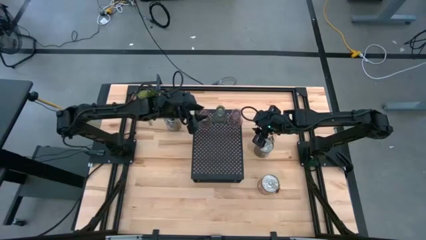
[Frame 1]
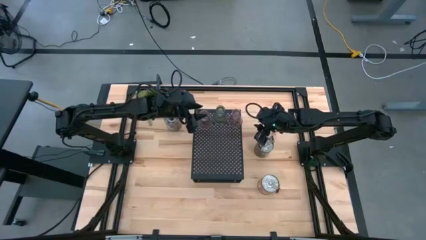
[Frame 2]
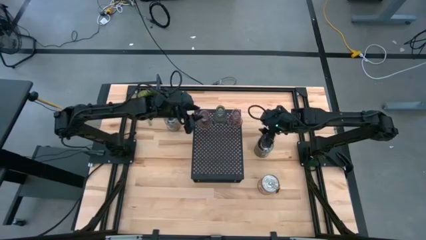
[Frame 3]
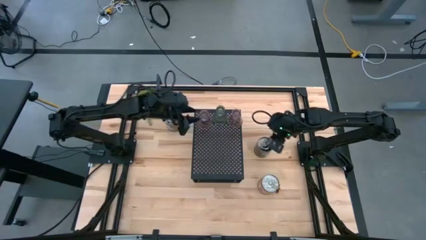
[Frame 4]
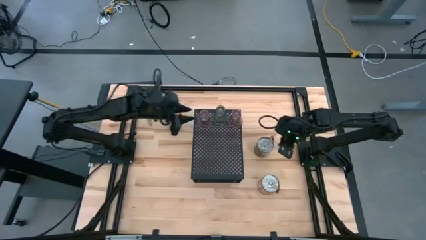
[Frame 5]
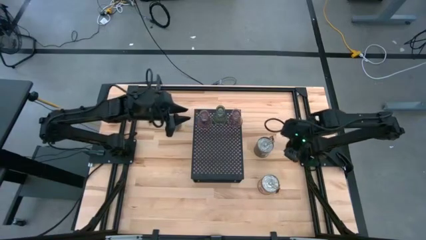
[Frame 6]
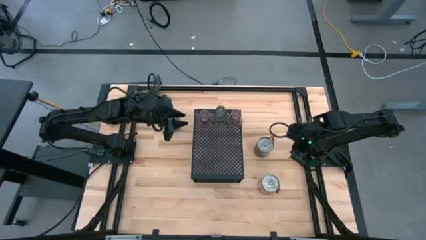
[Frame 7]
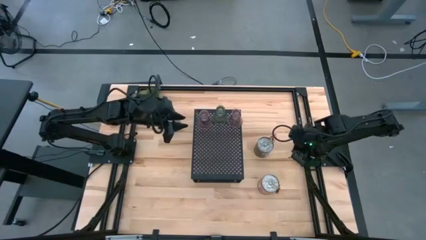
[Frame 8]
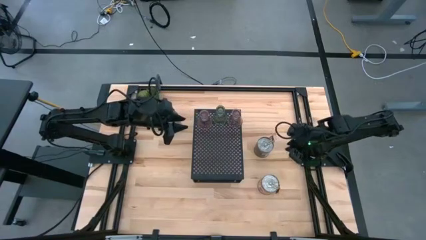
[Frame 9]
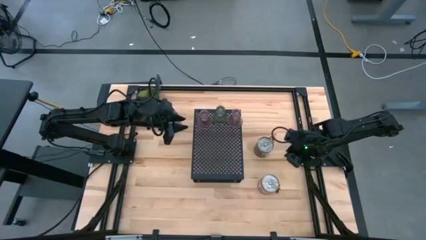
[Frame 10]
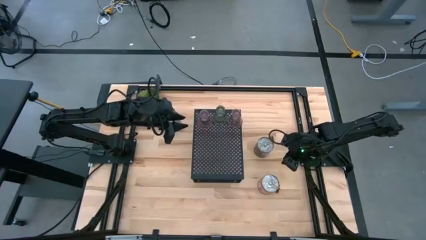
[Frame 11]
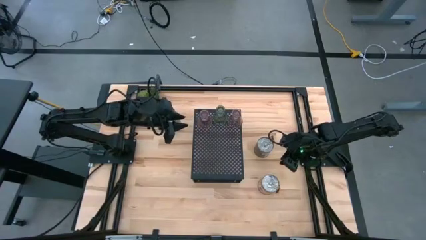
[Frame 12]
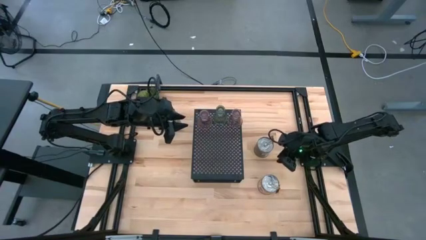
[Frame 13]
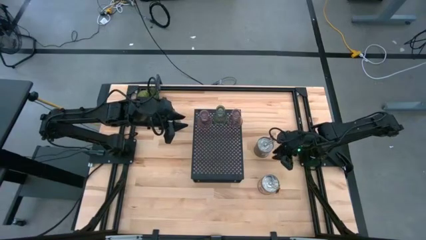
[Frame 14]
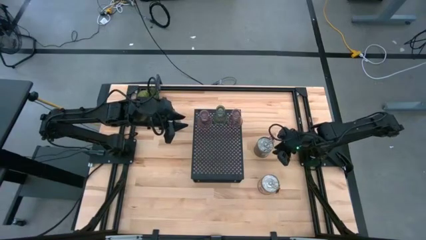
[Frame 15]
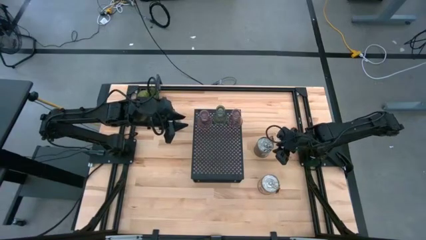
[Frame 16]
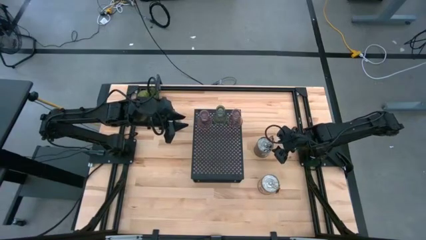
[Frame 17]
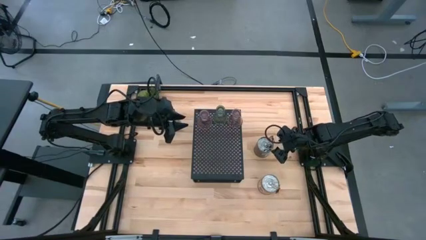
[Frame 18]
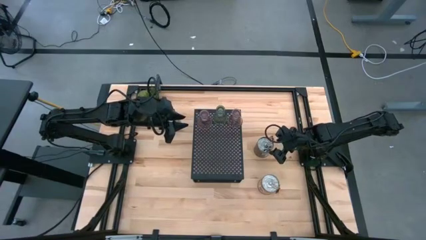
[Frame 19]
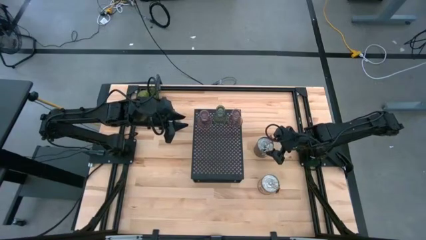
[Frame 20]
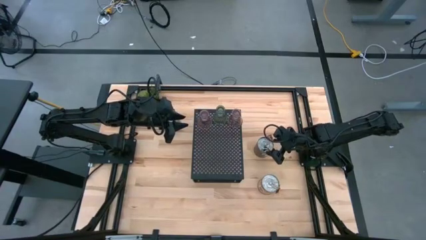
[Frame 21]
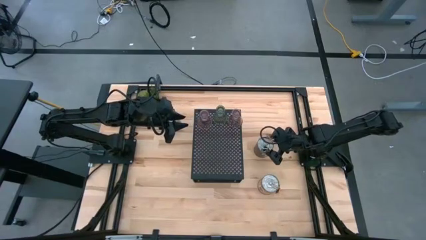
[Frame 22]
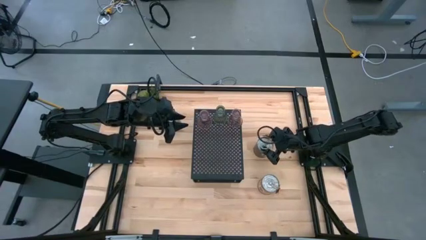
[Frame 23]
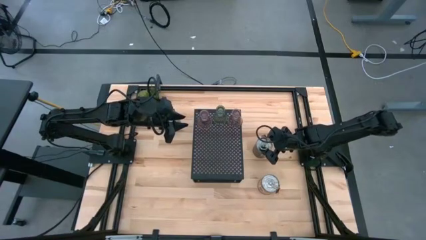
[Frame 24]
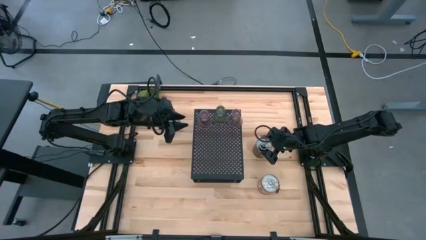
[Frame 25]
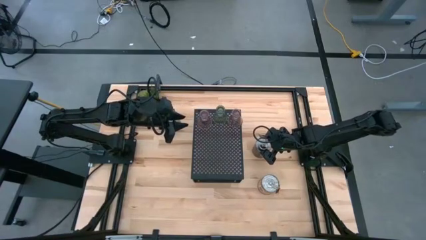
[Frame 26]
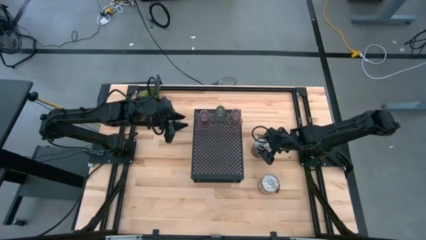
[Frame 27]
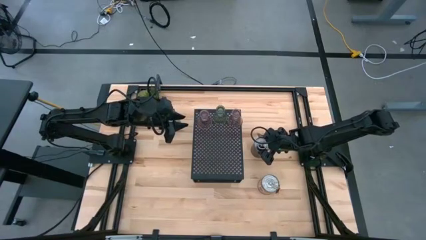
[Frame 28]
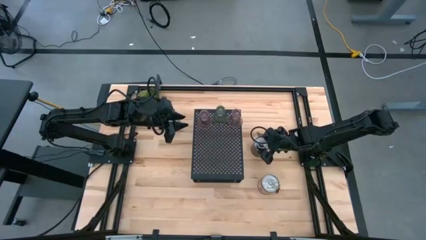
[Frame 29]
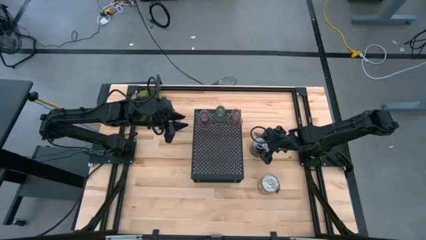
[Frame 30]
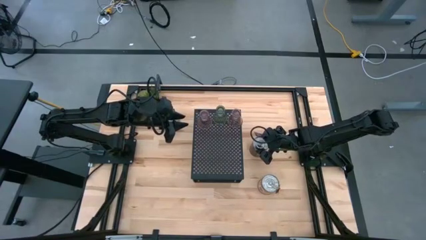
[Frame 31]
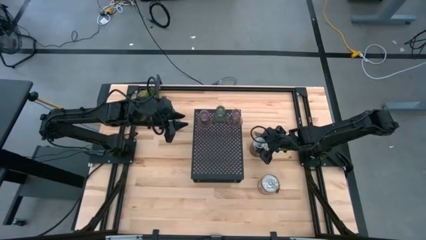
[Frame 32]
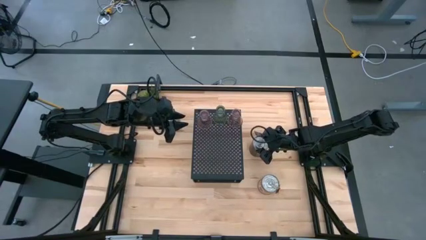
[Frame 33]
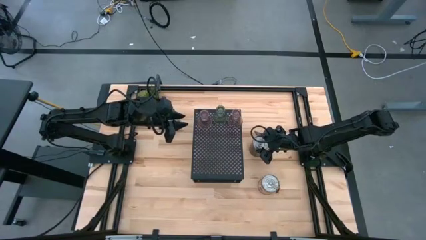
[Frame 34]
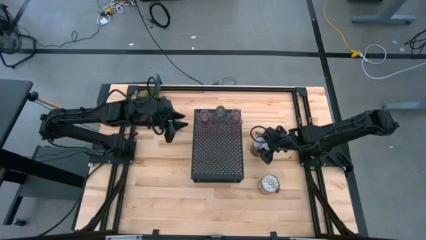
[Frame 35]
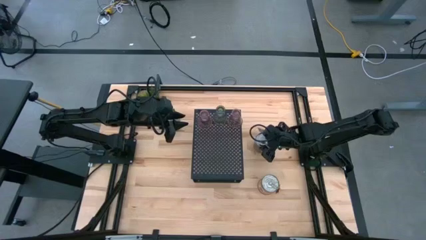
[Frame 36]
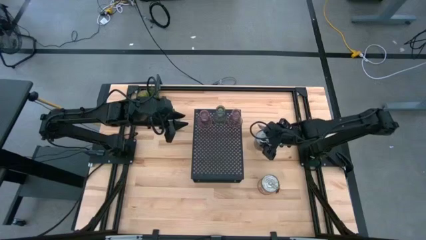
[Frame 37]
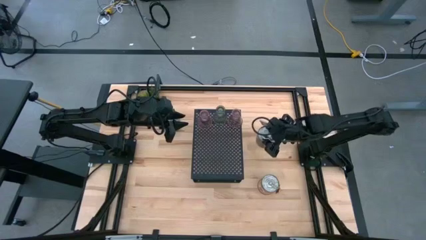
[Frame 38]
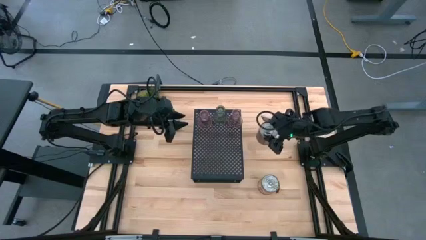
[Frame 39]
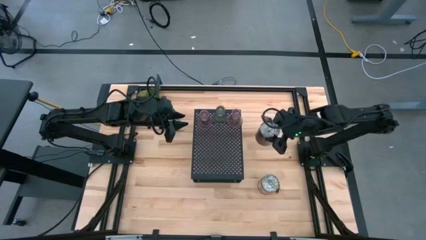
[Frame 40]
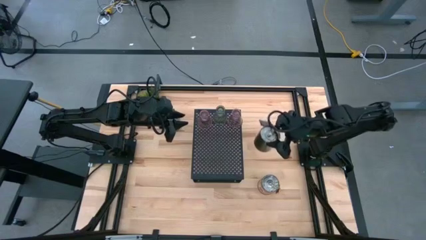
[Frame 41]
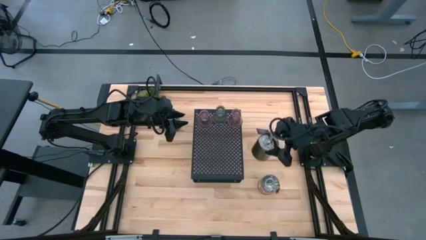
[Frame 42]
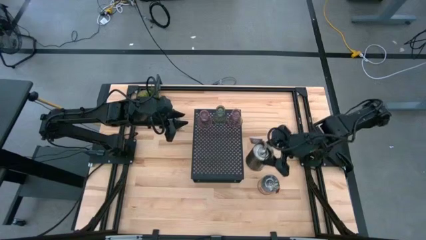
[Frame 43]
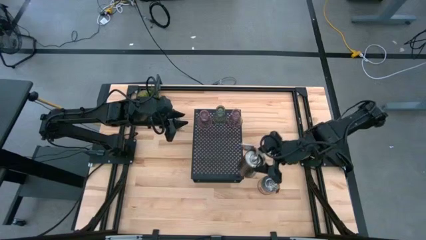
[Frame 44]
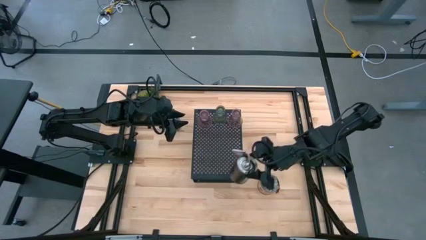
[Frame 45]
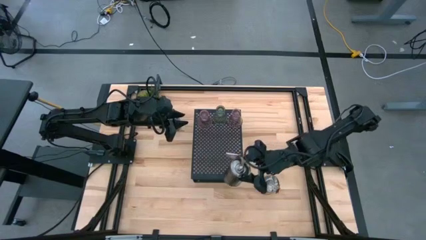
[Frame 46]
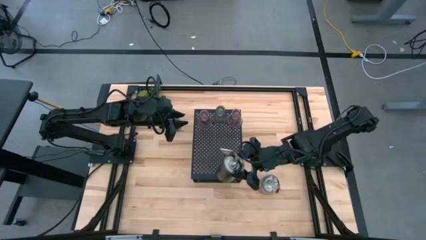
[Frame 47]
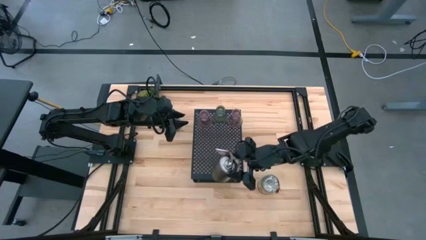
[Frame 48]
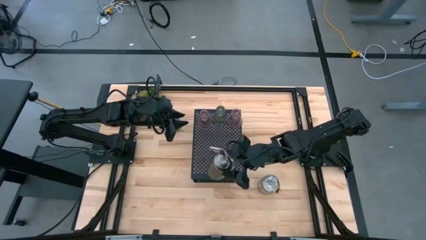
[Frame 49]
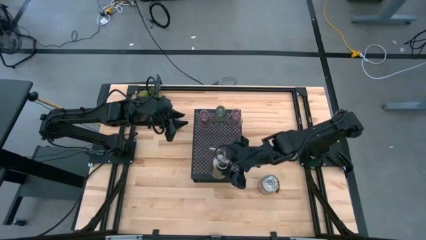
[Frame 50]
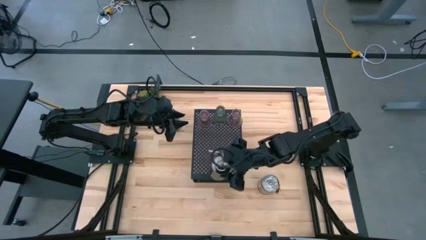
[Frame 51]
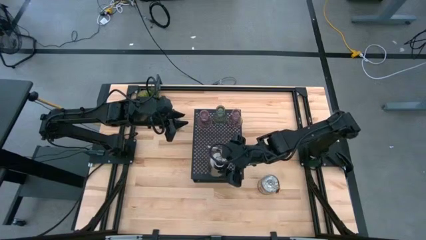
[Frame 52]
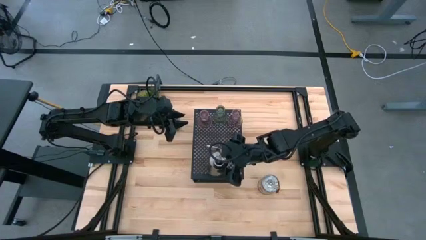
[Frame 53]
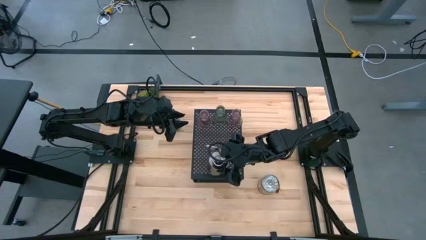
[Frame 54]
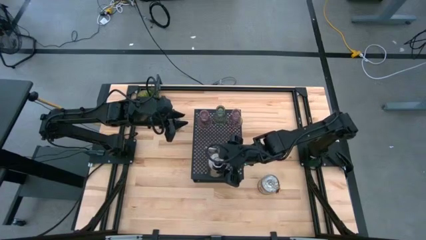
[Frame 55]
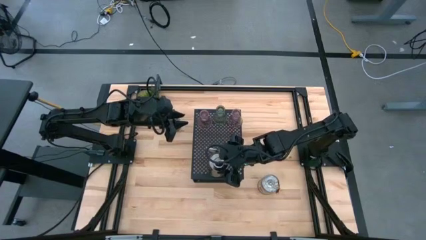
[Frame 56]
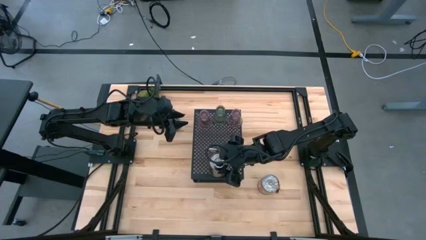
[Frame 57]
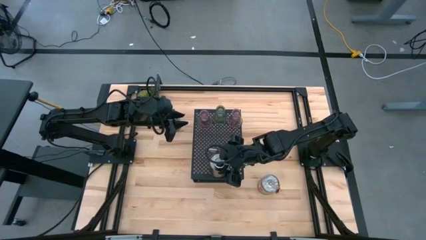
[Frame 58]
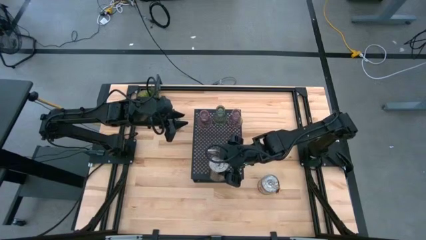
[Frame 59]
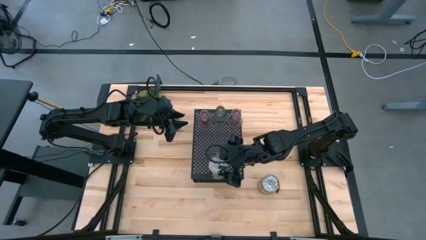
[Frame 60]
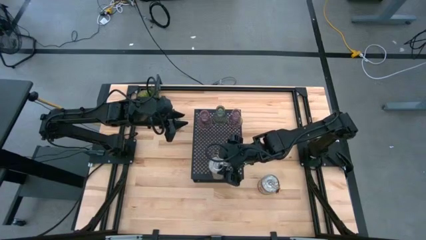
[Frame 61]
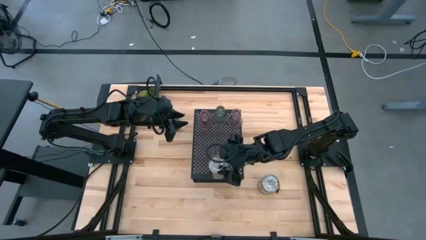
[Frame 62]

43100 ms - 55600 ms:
Task: Pick & Place candle stick holders
Put the right brown scented candle on the shelf

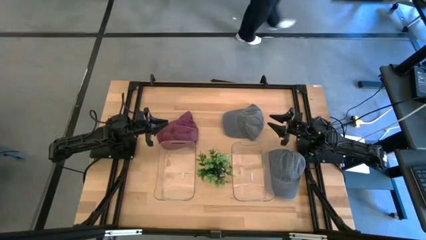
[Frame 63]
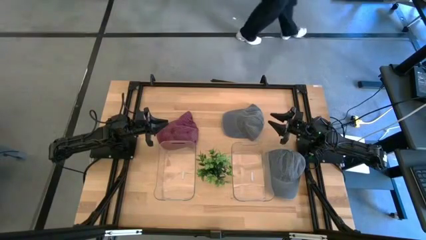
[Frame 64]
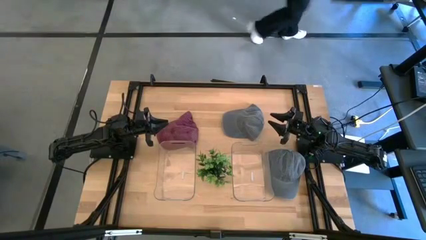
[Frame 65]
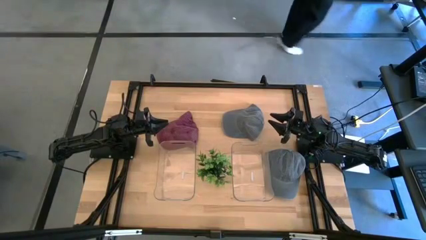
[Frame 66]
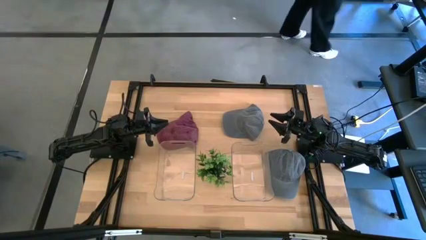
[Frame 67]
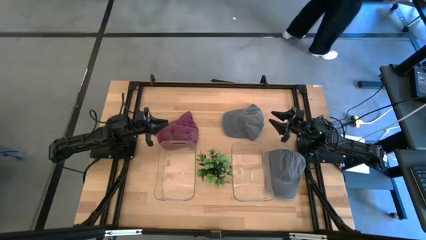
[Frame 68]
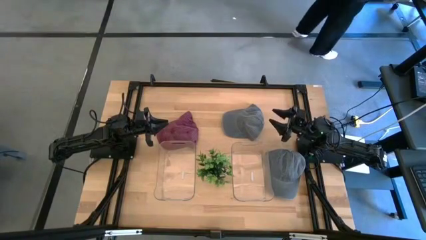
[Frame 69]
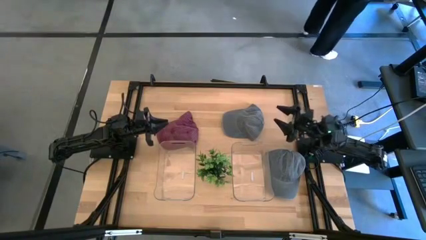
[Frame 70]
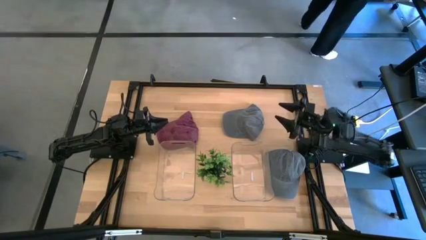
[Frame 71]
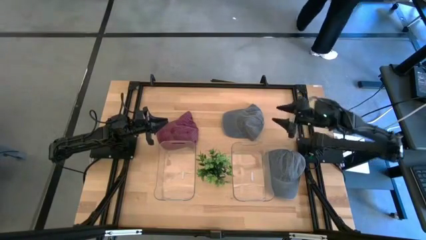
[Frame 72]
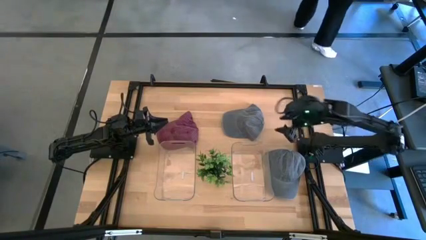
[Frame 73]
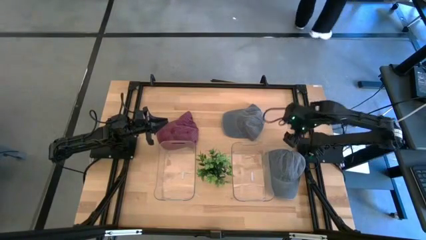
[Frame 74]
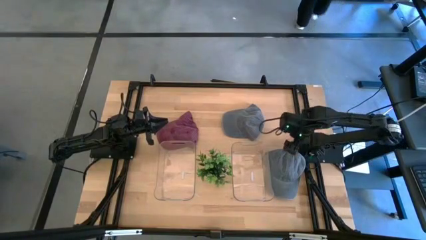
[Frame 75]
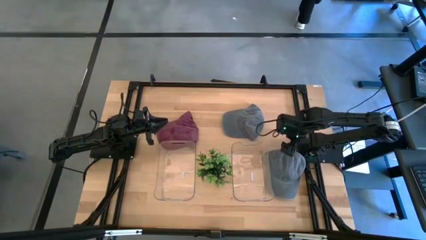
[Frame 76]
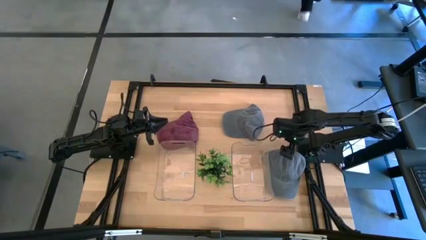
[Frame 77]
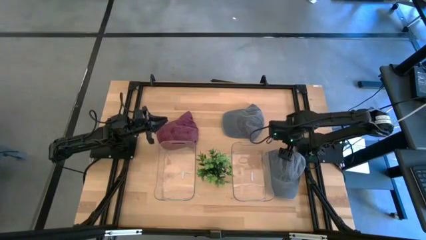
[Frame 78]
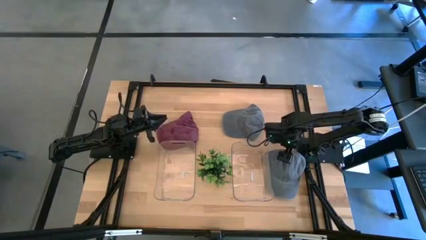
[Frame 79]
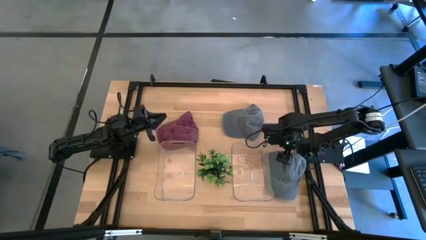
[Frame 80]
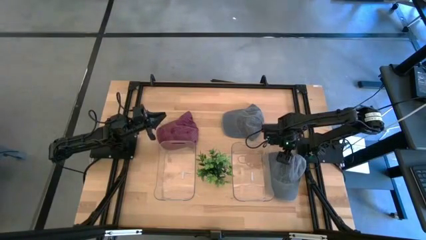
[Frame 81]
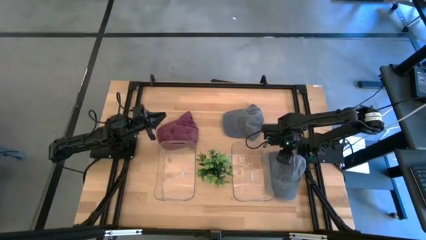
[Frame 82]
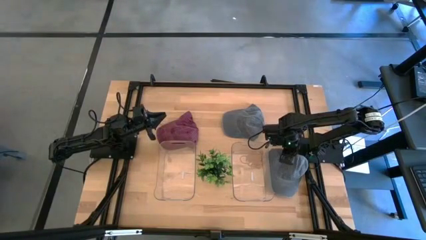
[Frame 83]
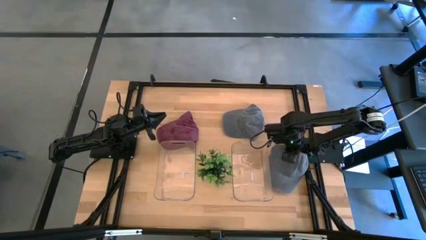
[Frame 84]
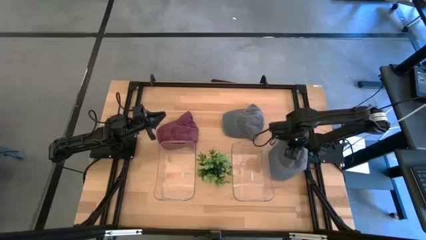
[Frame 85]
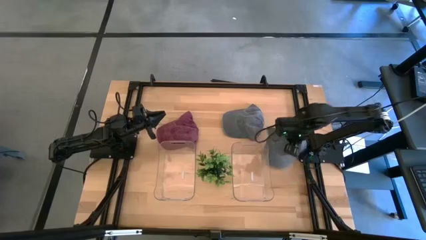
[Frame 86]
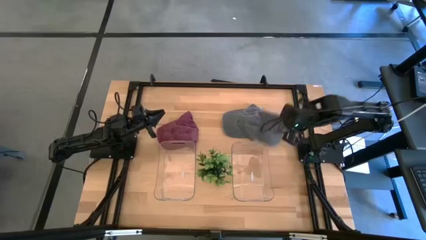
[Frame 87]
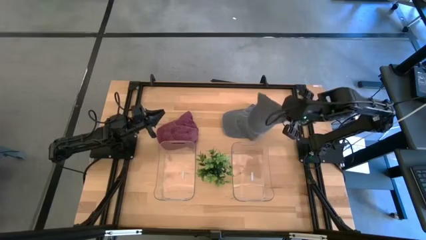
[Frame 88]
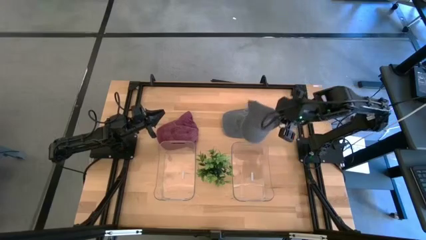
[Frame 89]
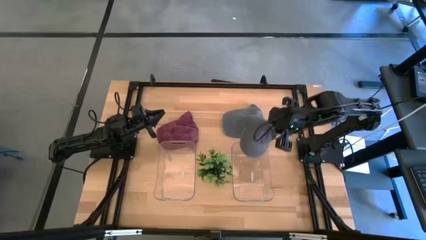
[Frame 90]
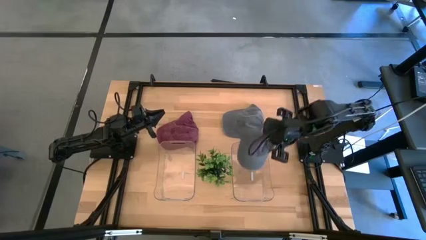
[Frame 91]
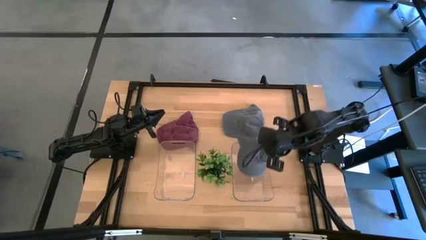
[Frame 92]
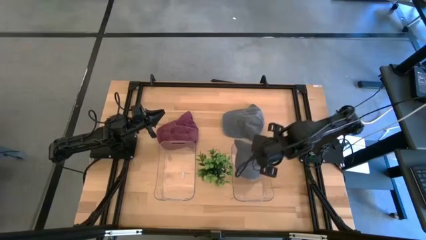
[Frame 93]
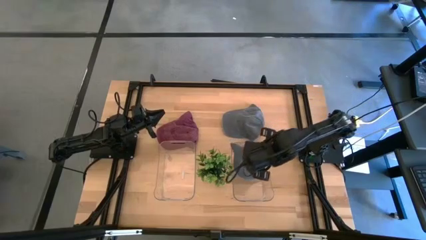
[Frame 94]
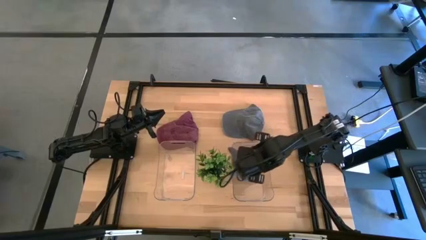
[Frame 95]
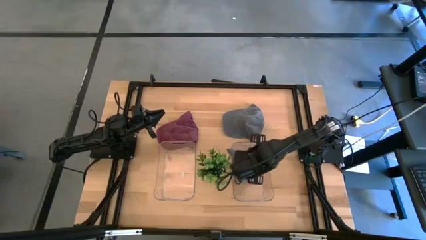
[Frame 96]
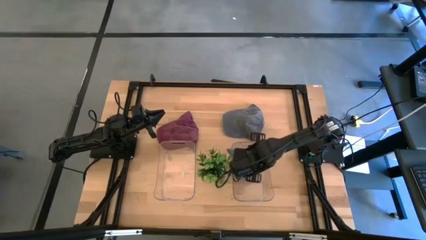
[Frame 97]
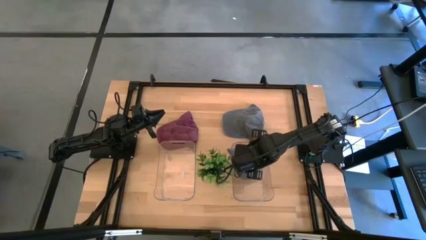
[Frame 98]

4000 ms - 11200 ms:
Task: Pick & Place hat
Put the bottom gray cap into the right transparent bin
